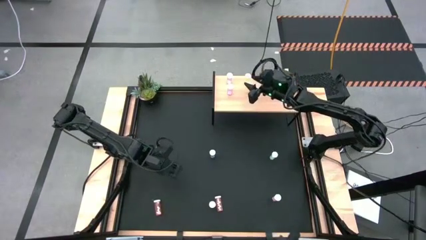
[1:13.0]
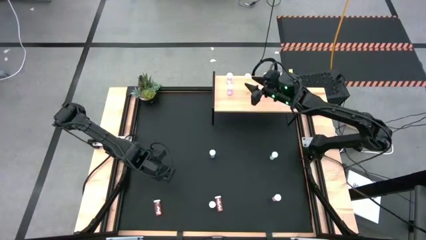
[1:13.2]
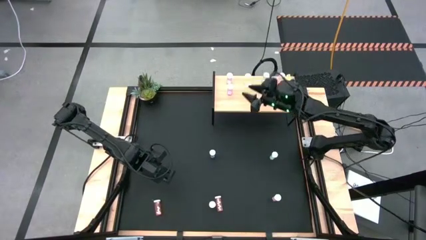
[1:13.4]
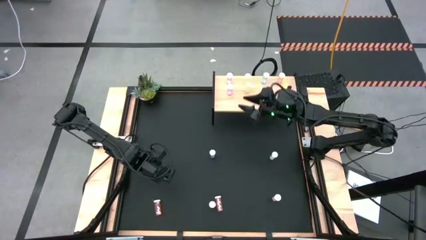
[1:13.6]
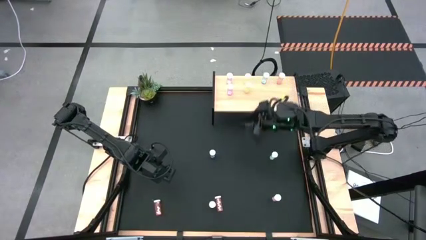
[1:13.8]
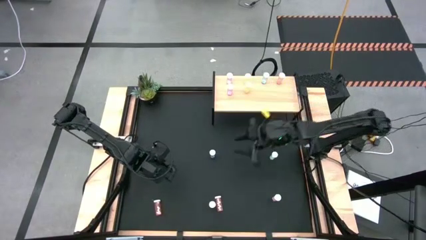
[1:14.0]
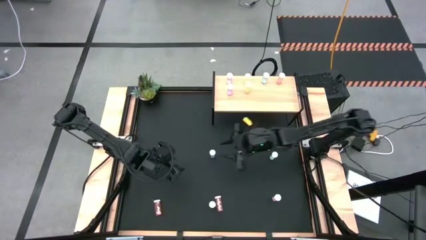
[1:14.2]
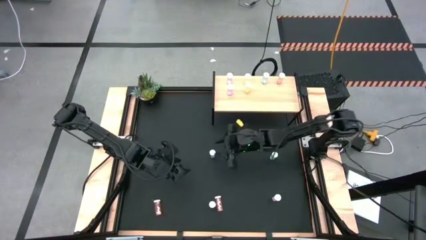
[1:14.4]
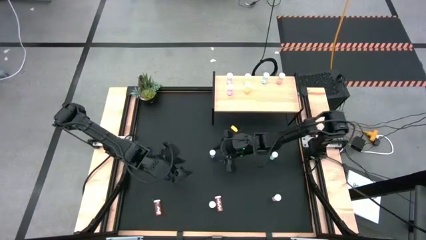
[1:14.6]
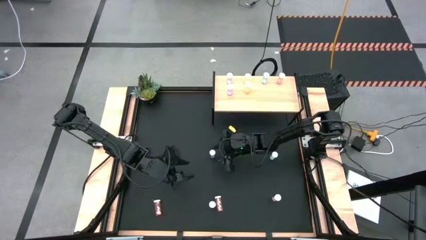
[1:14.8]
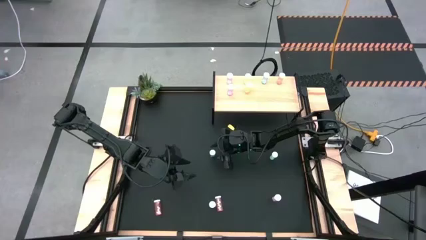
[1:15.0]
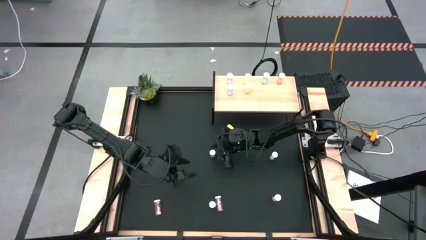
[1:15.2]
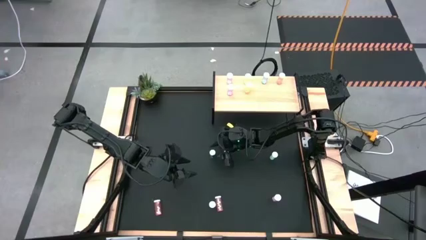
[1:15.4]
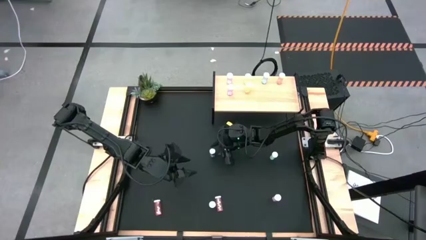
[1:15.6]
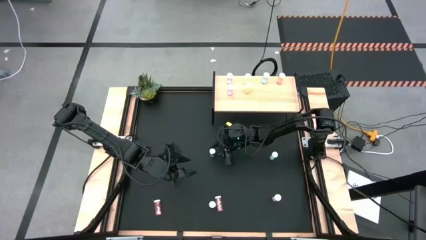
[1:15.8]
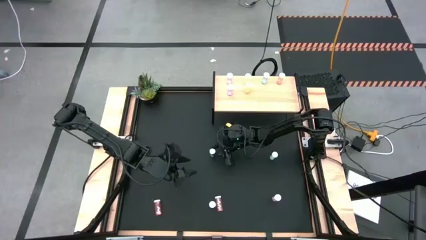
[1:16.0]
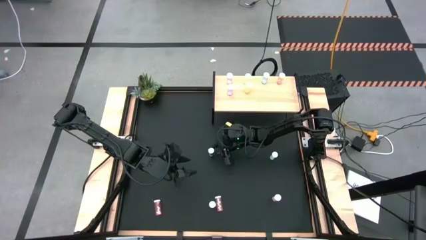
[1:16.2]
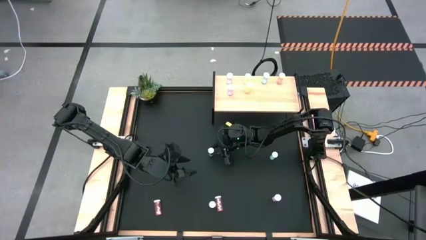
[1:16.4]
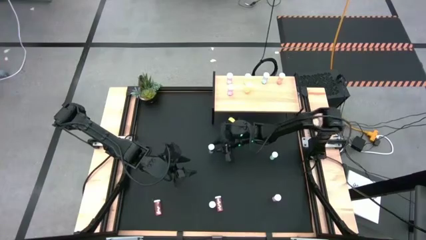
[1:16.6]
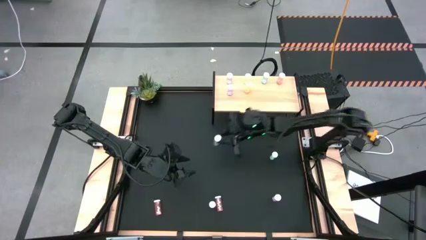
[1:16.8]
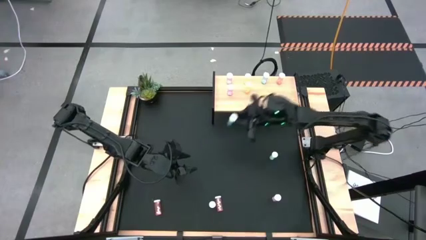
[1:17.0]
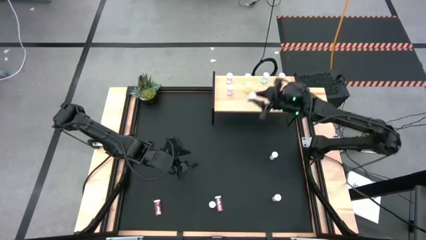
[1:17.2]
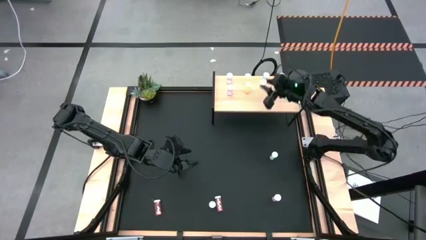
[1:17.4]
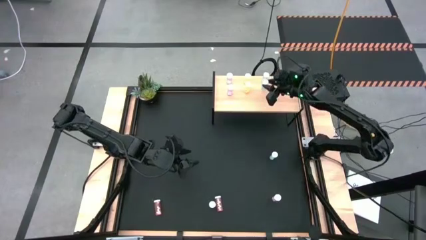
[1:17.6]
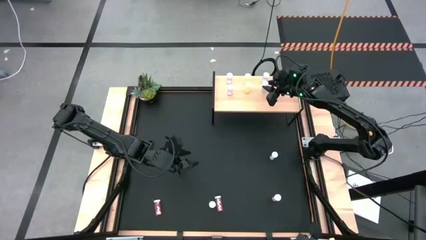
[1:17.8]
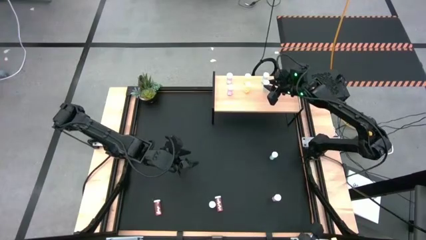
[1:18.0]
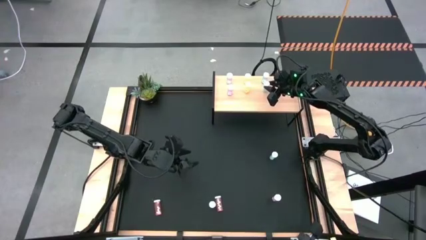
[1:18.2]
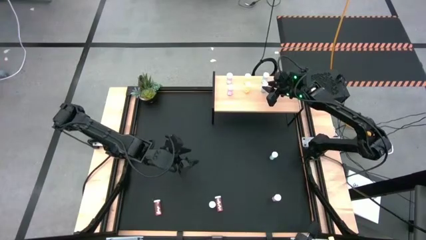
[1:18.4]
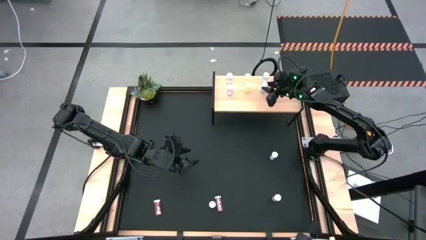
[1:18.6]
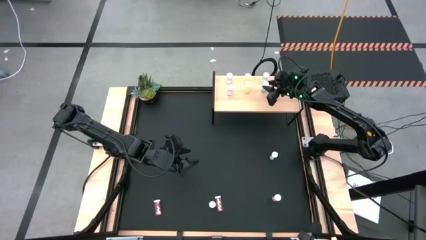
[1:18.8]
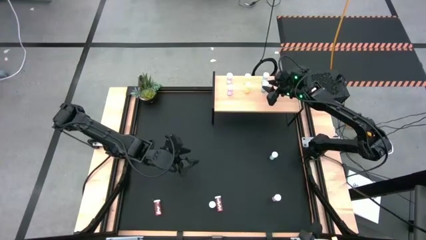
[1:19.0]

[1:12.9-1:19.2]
Task: Pick and place medicine bottles onto shelf by color
Put the left blue pill bottle on the shelf aligned with the other blue pill bottle

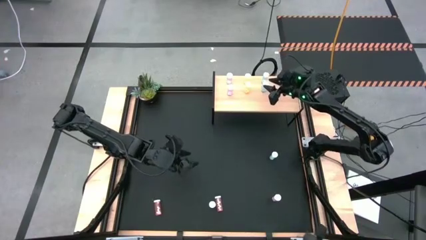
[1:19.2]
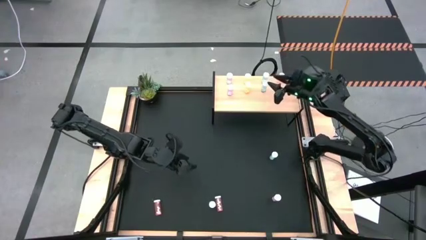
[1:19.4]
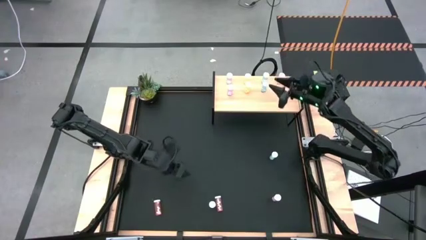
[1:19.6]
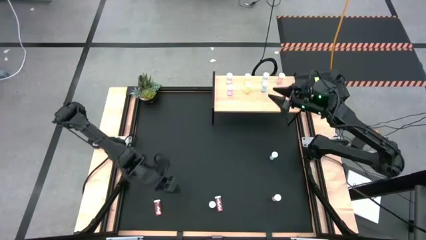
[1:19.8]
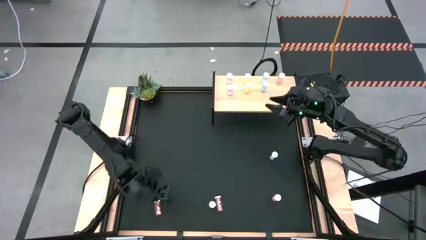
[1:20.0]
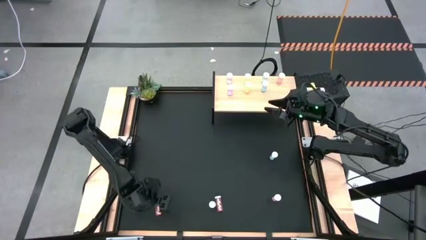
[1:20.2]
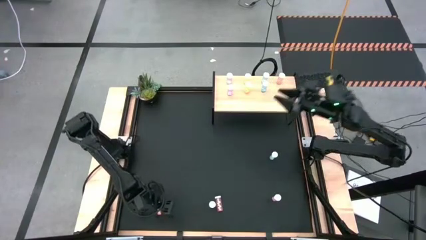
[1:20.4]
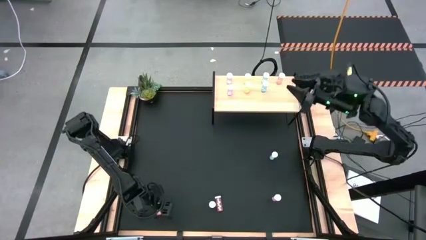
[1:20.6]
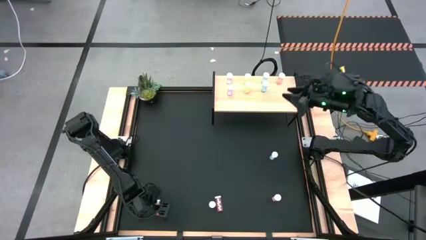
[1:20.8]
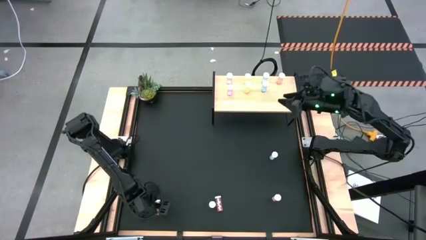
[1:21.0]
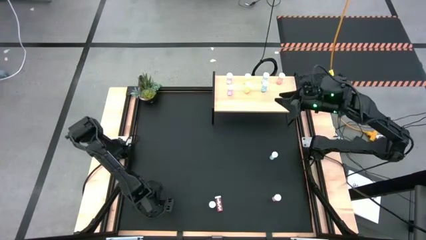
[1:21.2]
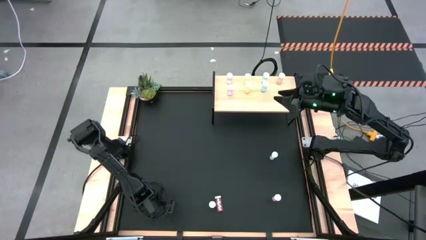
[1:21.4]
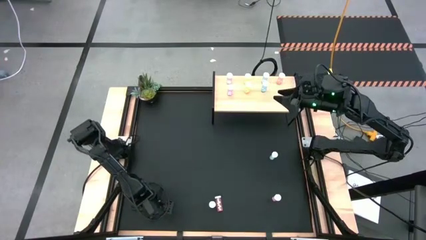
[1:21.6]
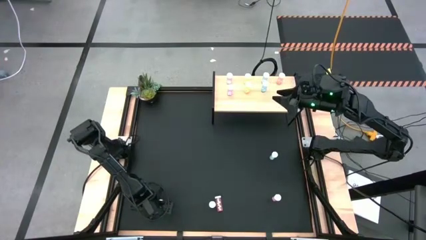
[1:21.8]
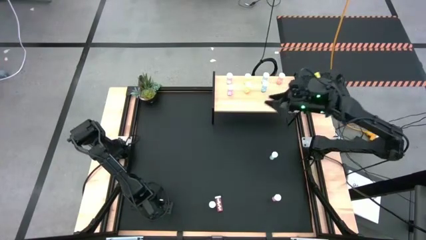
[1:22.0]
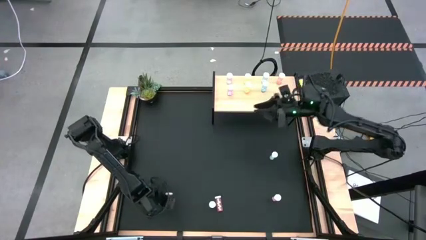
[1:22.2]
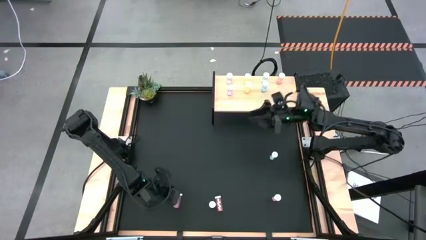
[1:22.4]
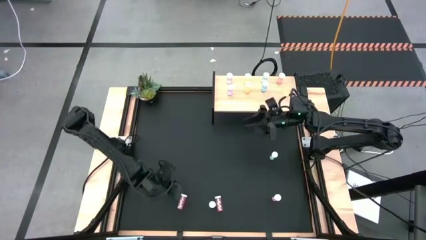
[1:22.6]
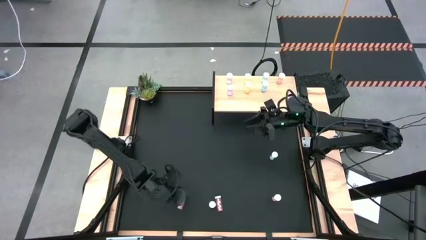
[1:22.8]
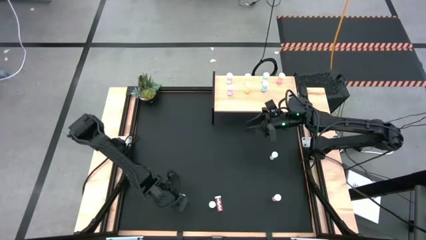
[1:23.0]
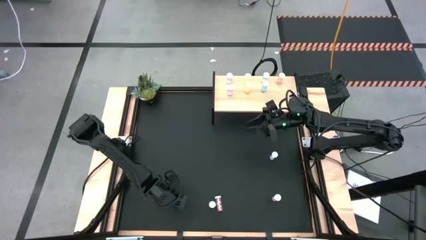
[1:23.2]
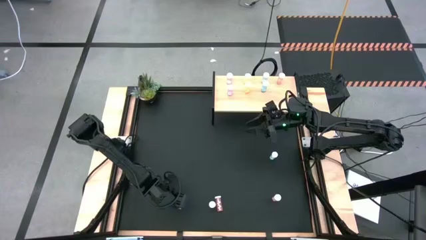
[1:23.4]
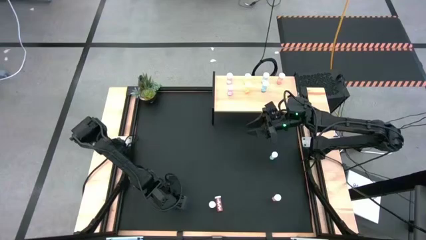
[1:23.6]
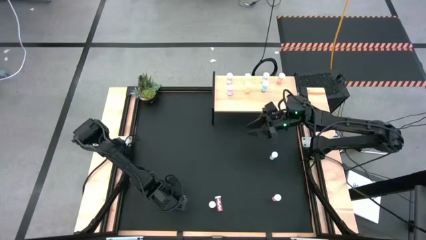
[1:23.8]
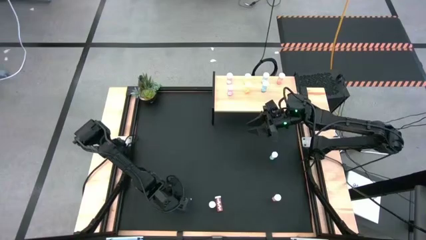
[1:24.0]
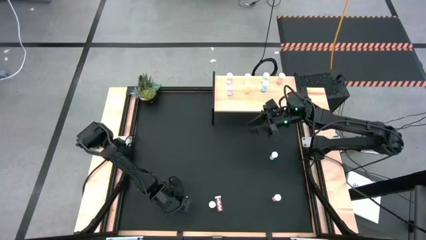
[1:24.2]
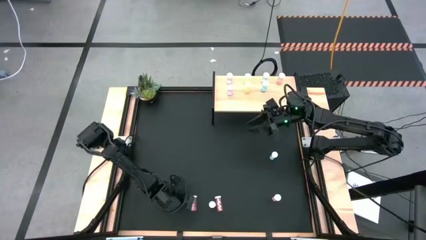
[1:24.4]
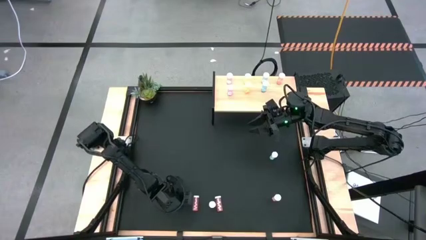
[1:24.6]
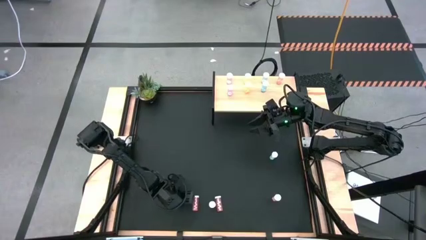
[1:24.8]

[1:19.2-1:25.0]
Put the left pink pill bottle on the shelf aligned with the other pink pill bottle

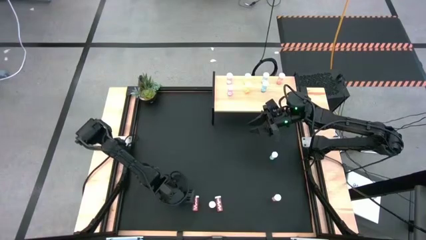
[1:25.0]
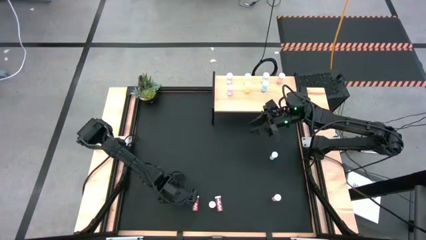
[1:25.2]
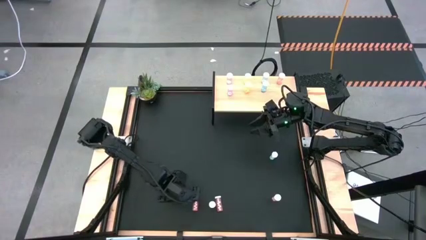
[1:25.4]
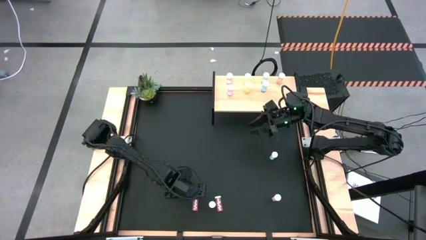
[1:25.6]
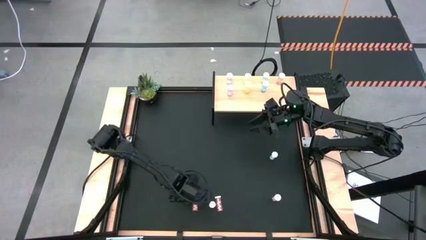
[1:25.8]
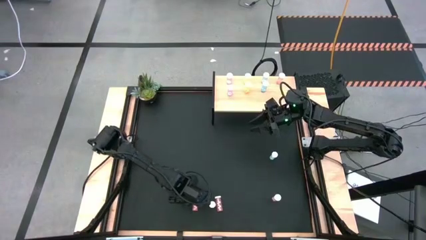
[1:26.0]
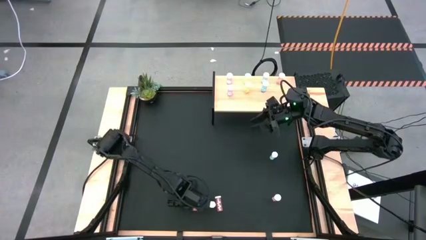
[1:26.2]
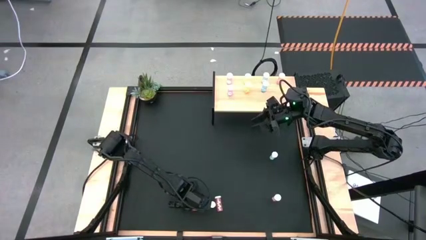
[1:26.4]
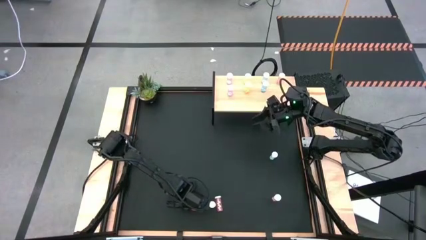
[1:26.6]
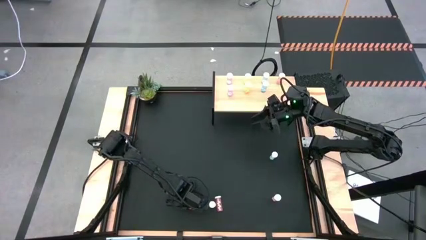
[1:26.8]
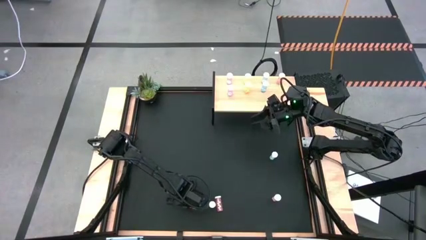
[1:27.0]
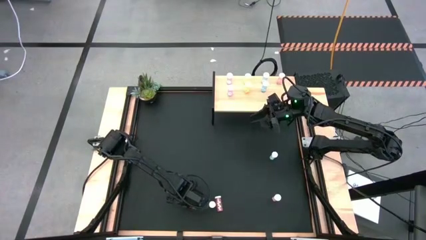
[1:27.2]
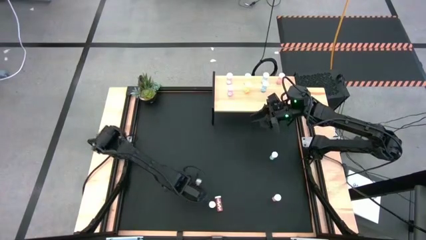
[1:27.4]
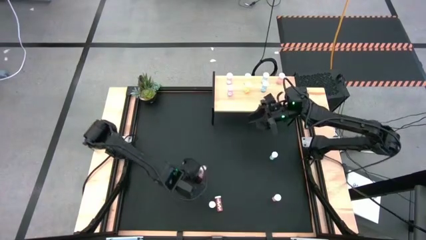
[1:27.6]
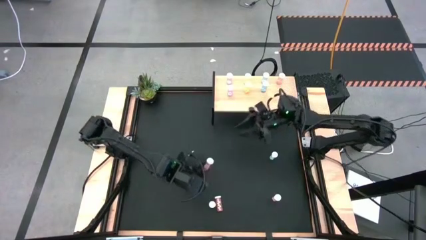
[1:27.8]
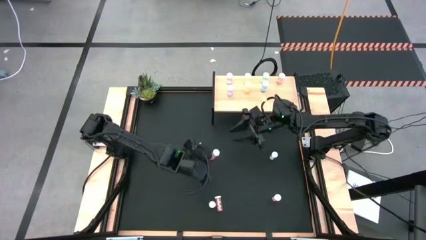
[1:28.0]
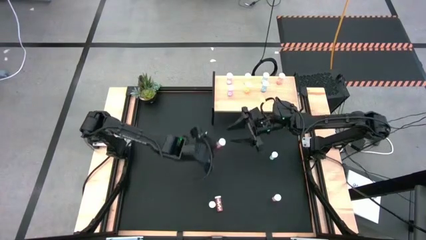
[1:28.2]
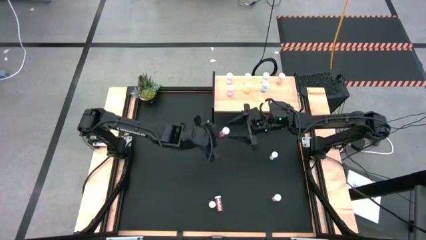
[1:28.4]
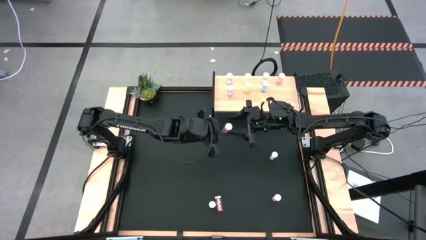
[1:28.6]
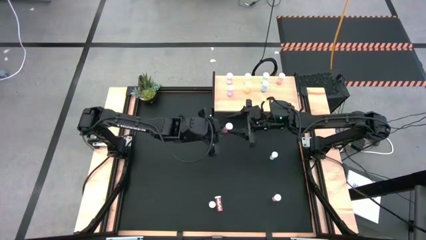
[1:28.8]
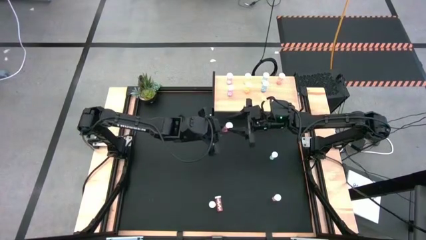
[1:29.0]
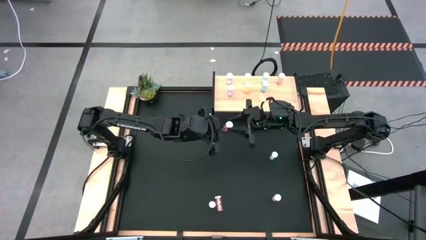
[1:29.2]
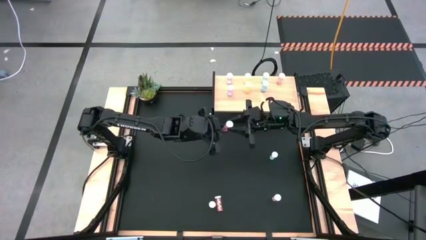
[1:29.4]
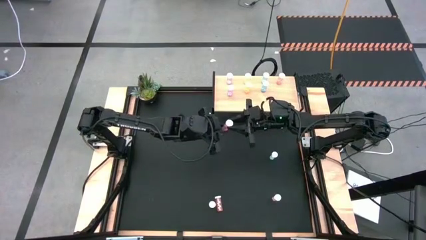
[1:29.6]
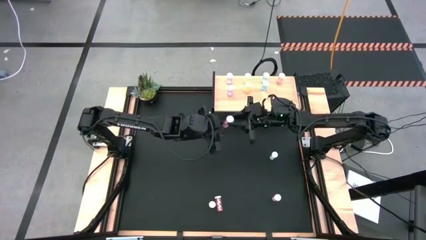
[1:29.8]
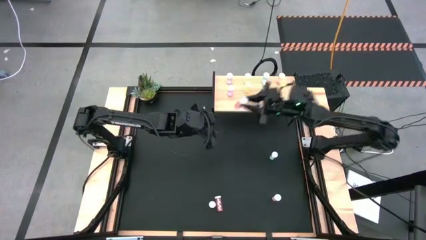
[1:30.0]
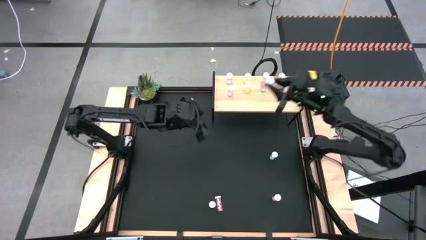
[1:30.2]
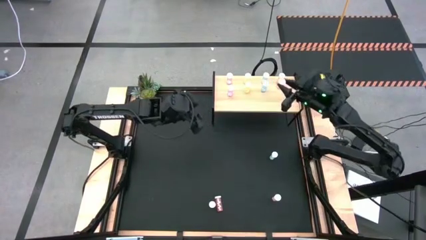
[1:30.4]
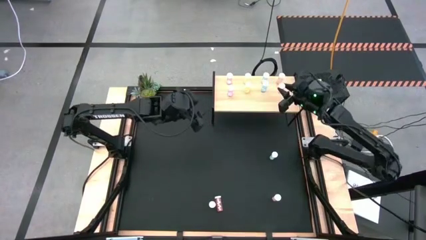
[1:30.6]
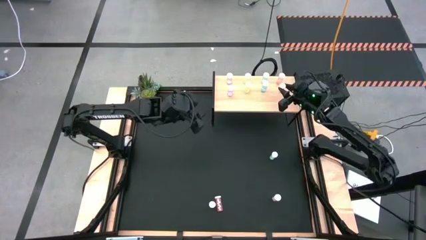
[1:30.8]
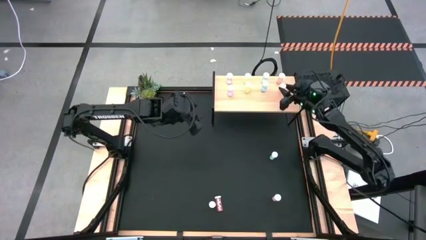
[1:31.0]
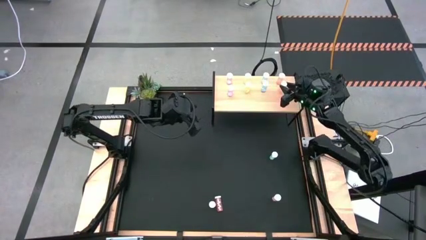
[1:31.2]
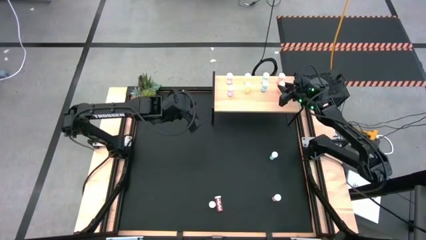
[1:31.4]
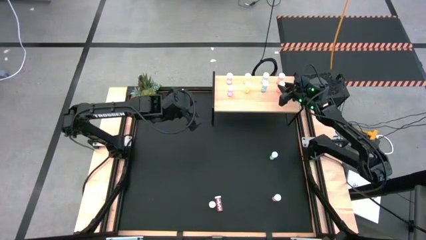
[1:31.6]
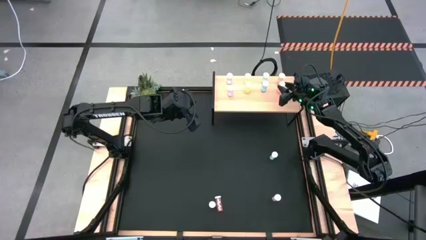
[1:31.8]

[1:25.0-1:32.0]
Put the bottom left pink pill bottle on the shelf aligned with the other pink pill bottle
